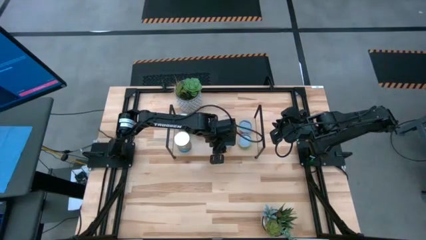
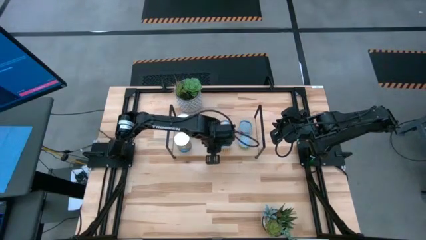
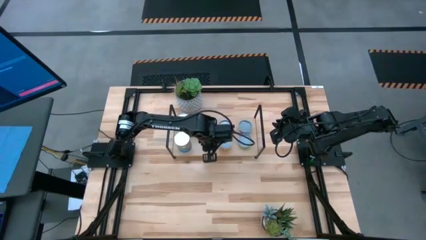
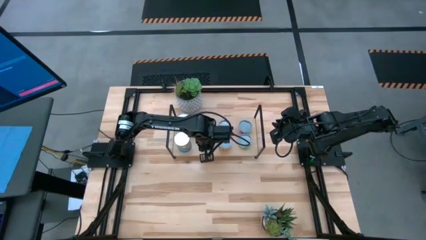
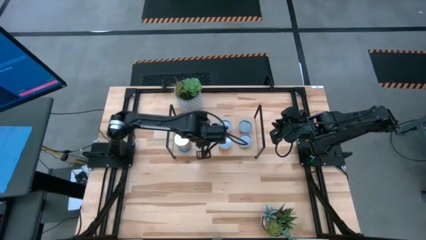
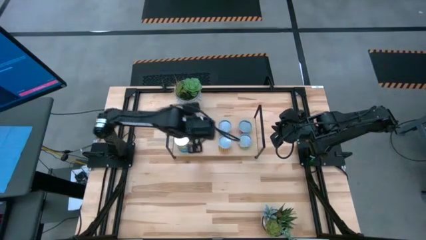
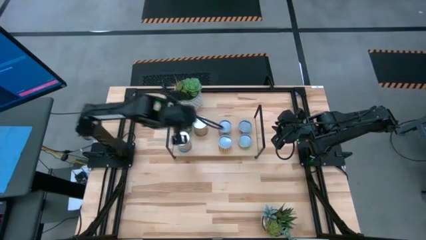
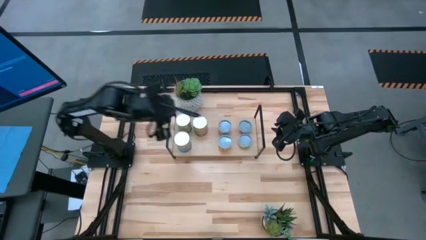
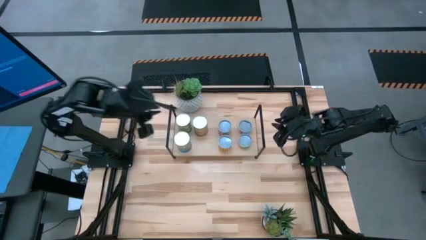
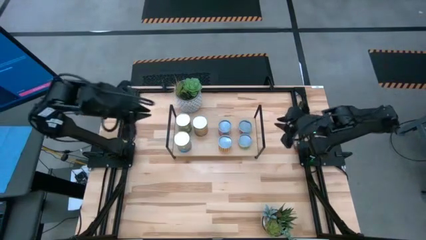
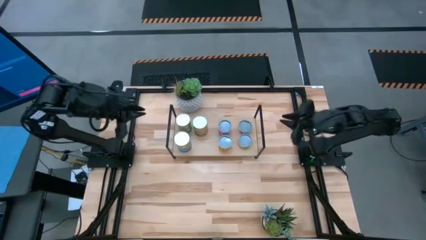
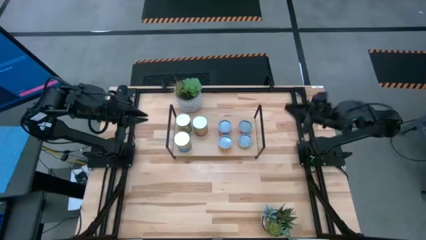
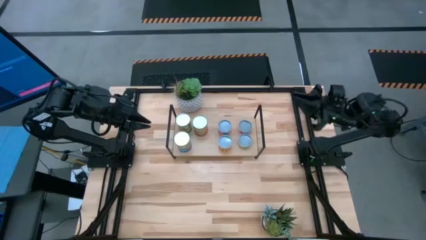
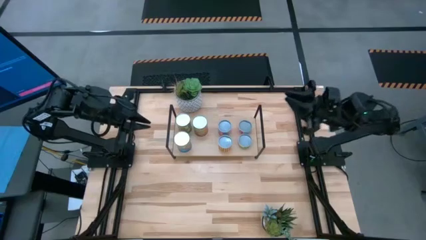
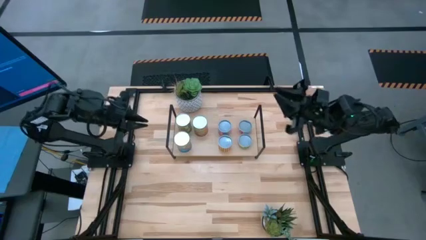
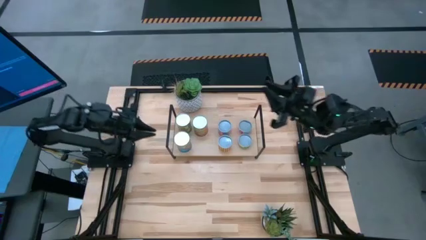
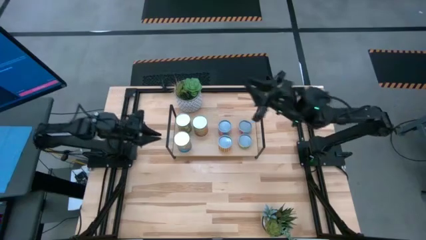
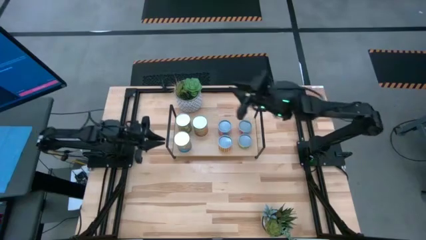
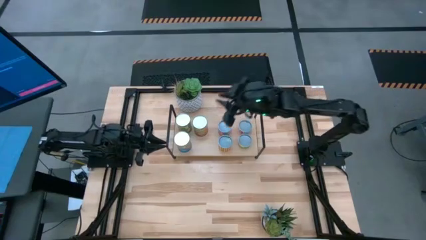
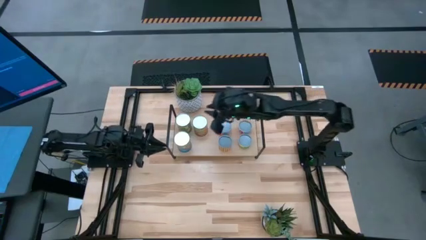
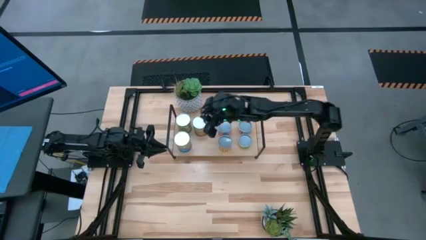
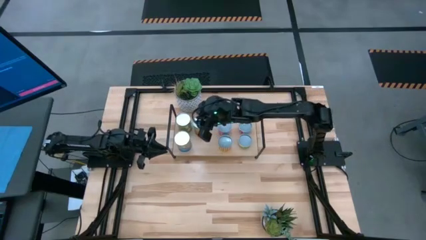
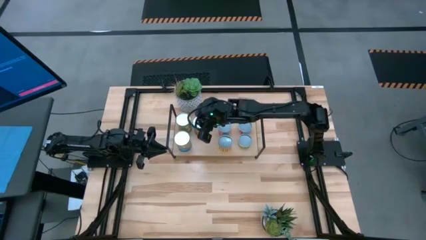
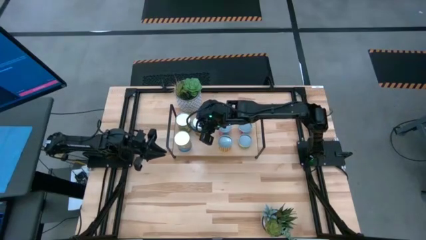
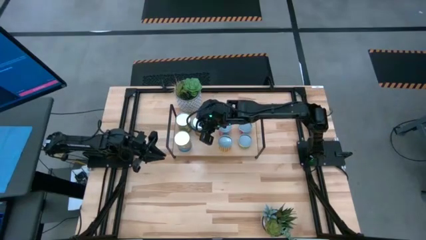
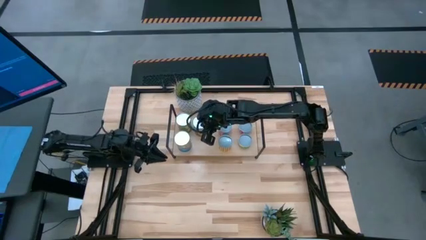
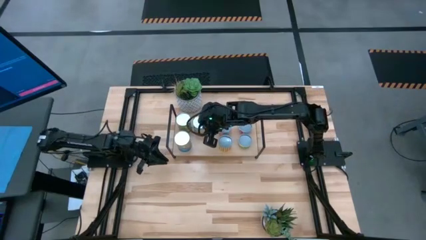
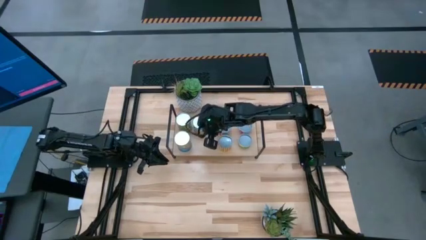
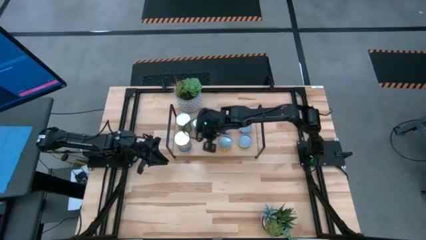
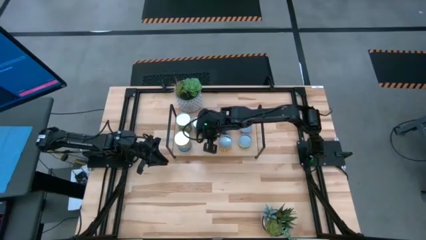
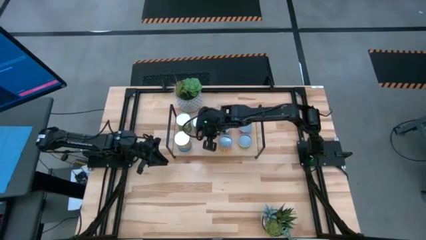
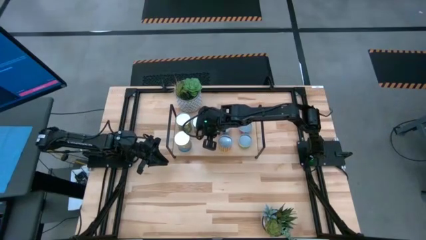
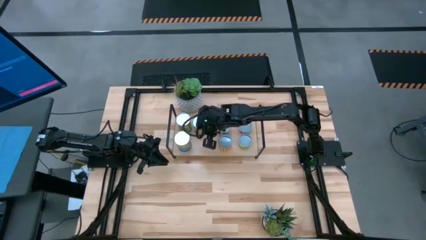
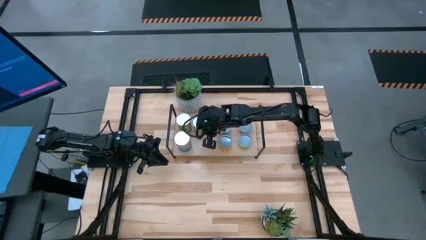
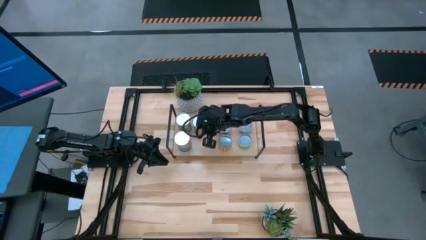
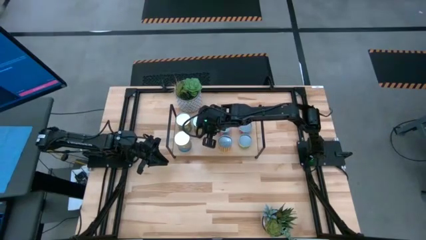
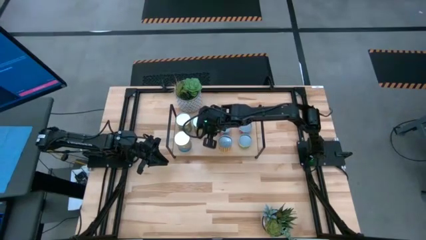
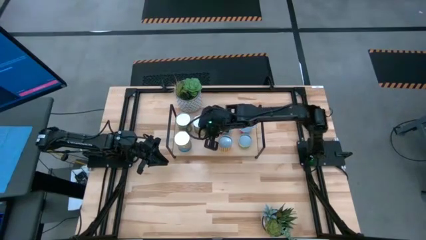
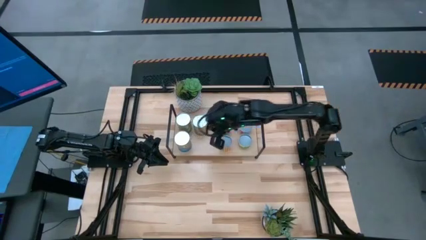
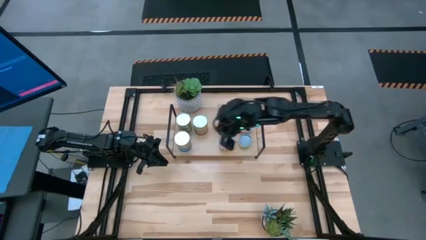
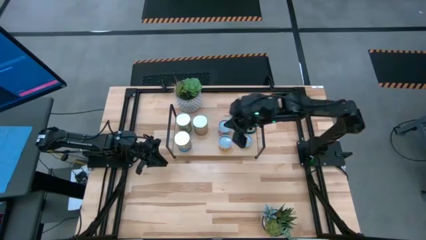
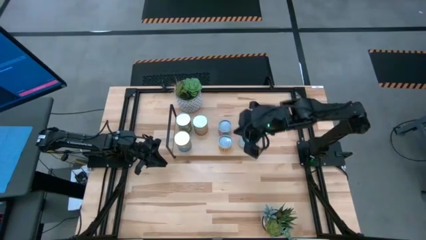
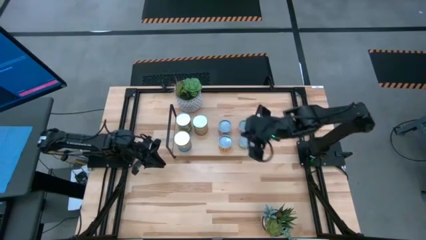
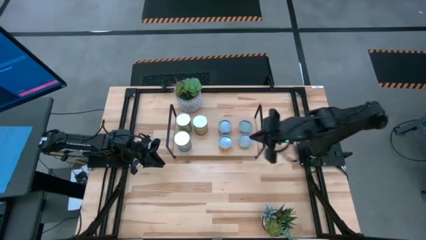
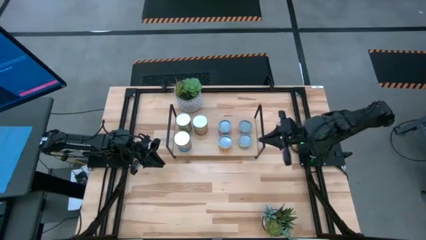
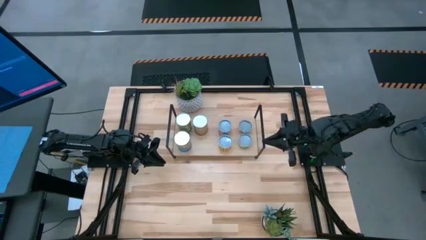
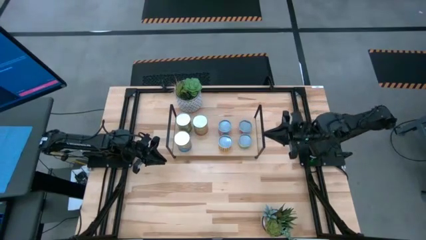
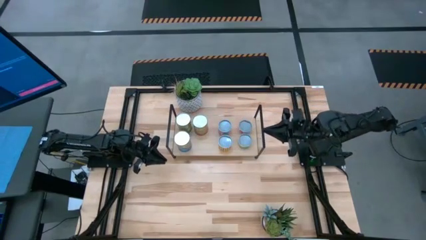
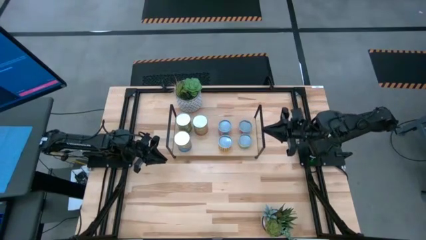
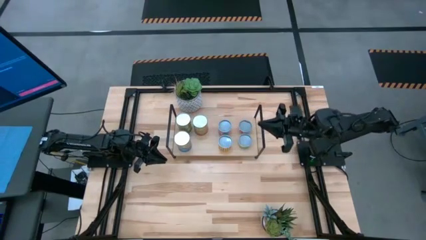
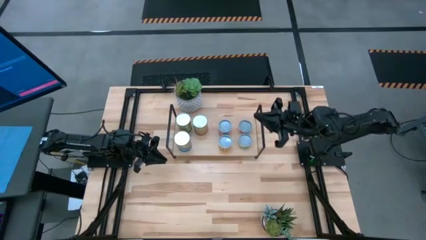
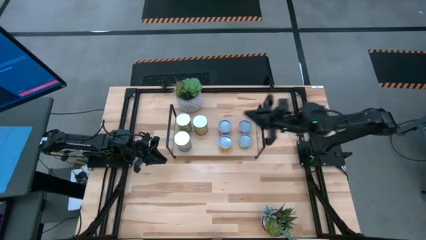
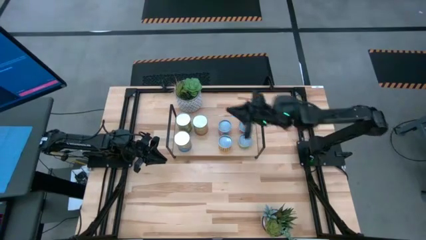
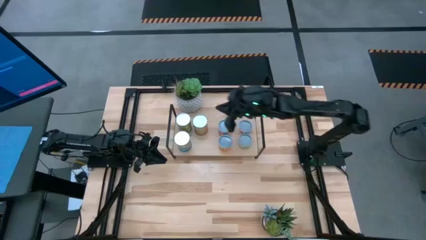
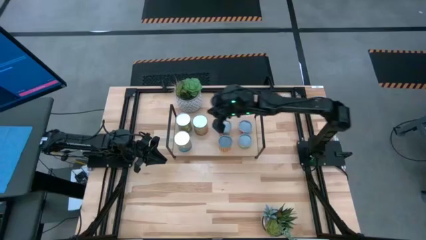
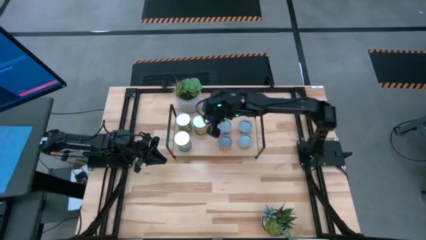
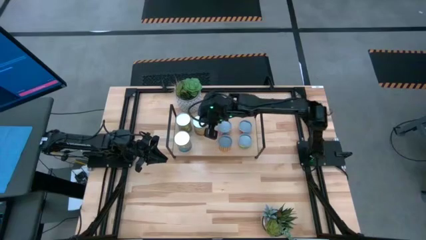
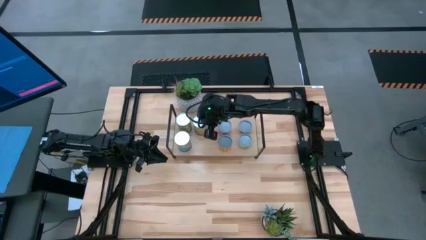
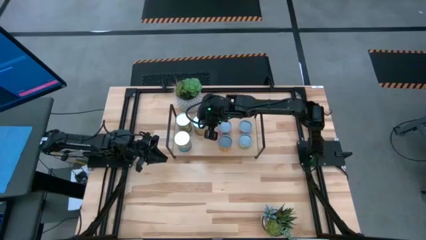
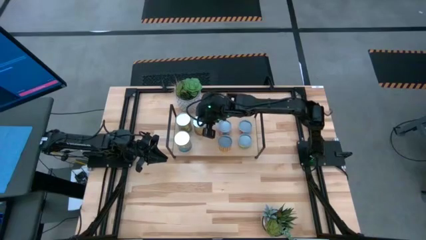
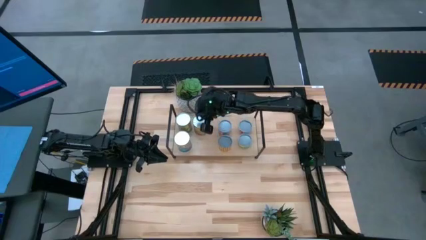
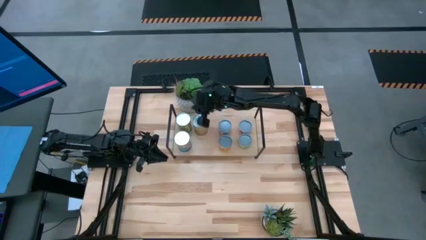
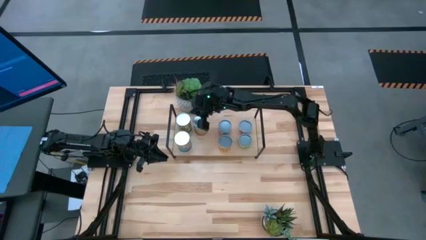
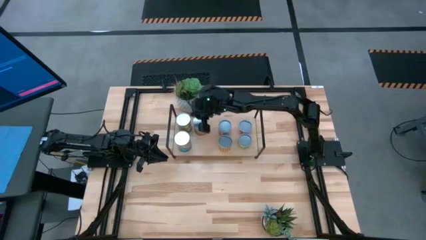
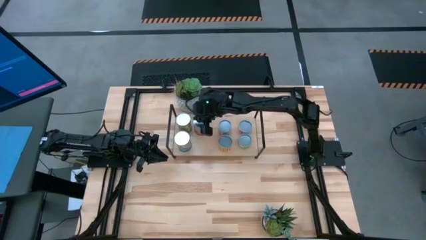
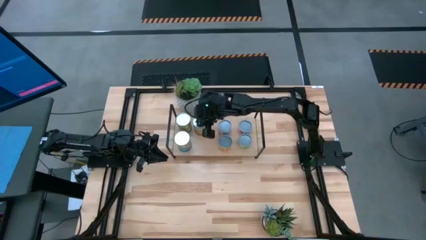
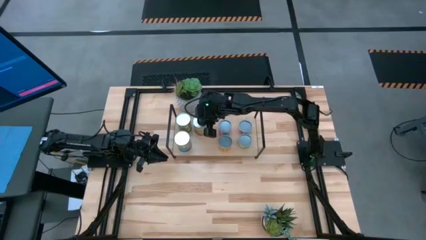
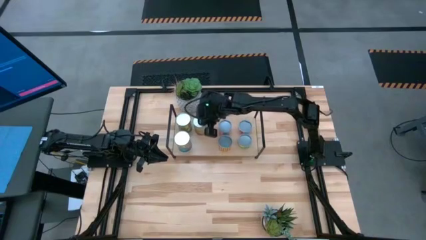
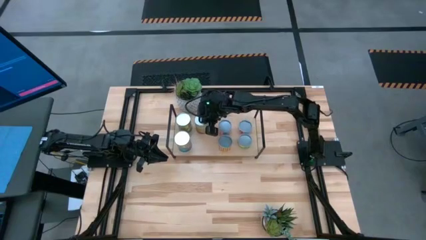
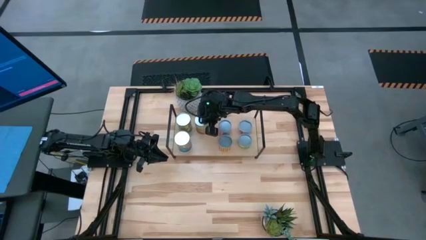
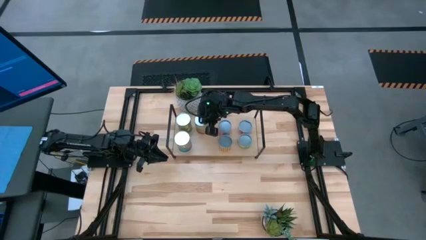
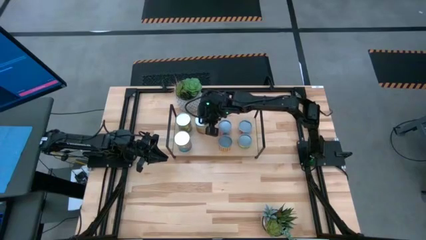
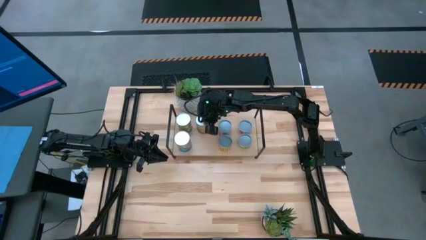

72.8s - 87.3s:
Task: Pick and place cans onto a shelf
Adjust the canned green beans

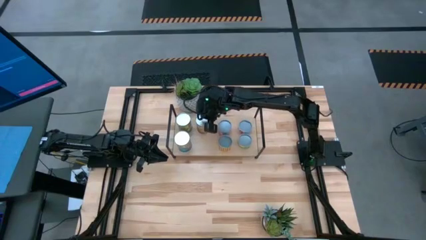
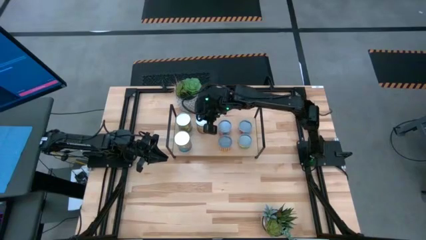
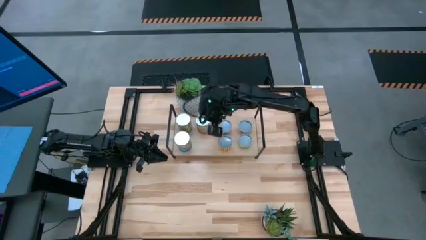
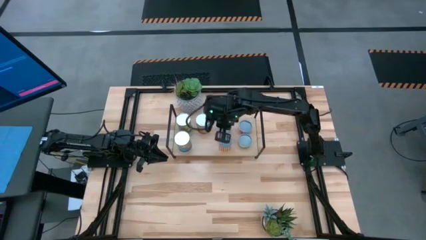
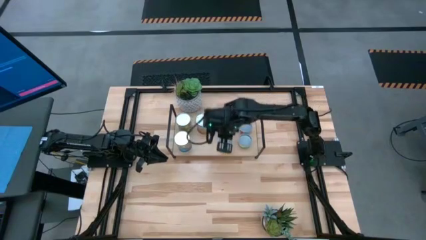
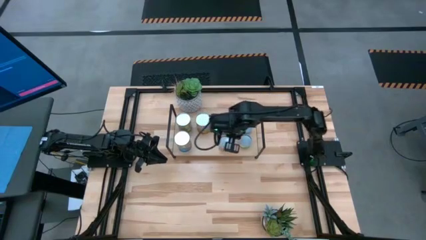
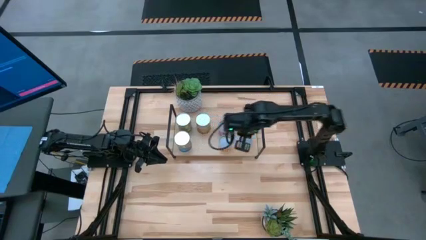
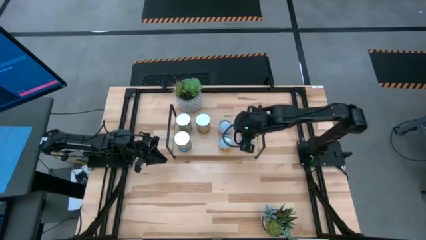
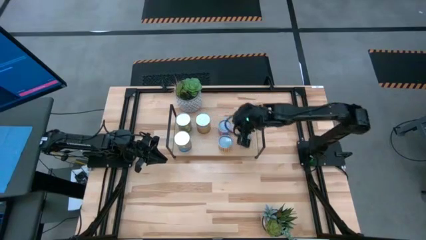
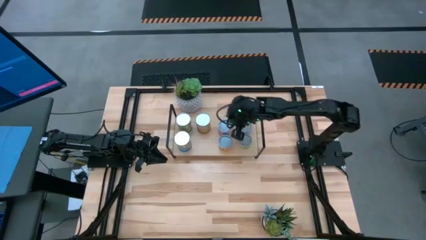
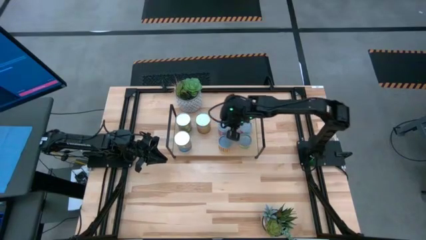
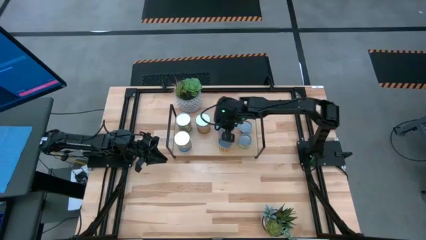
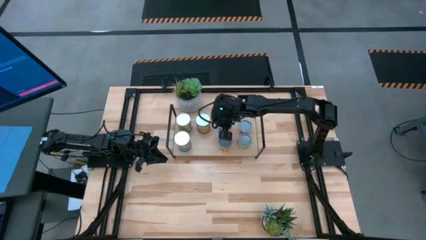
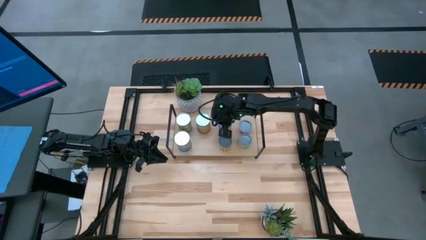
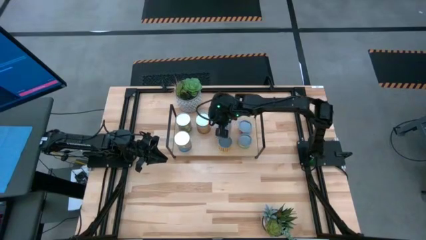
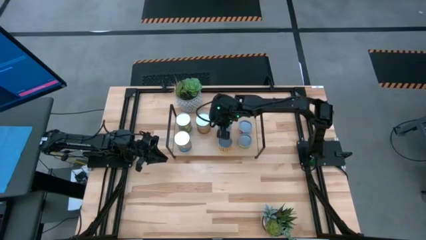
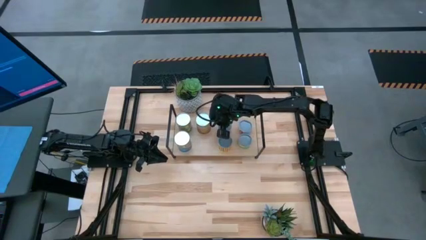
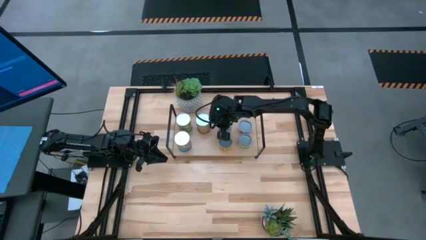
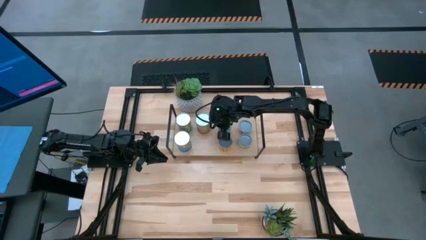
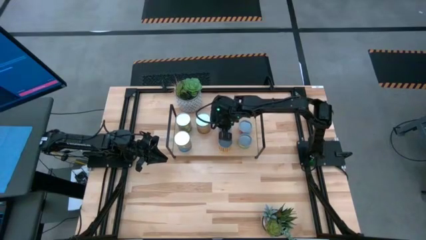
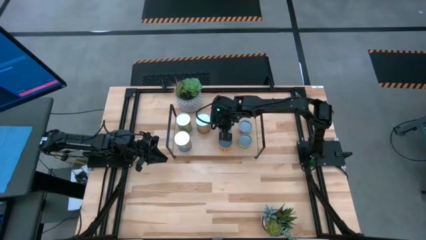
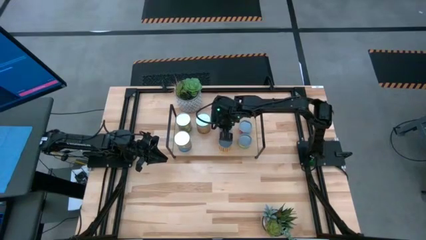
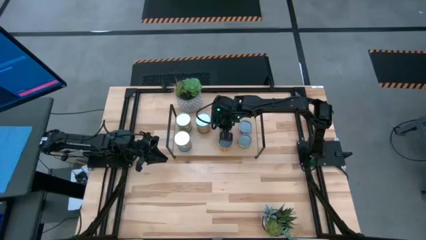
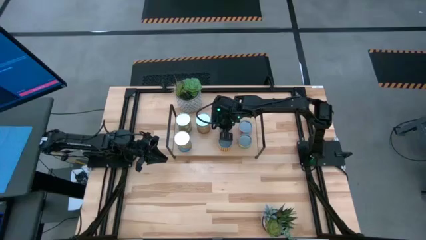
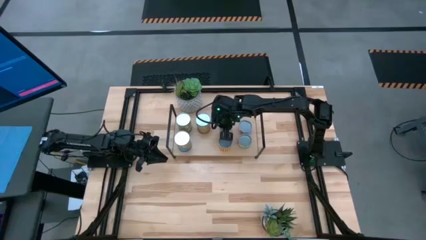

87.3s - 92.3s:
Adjust the canned mushroom
